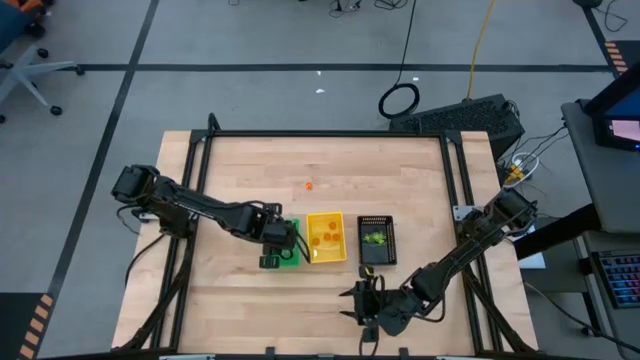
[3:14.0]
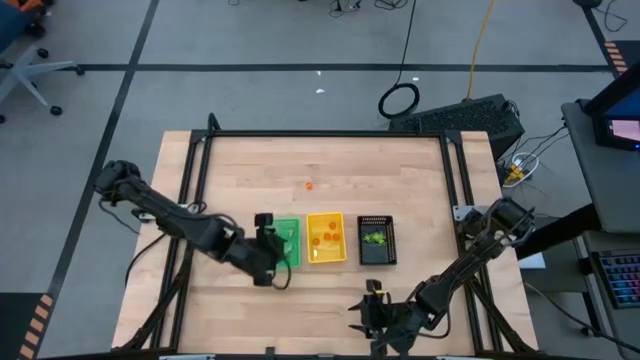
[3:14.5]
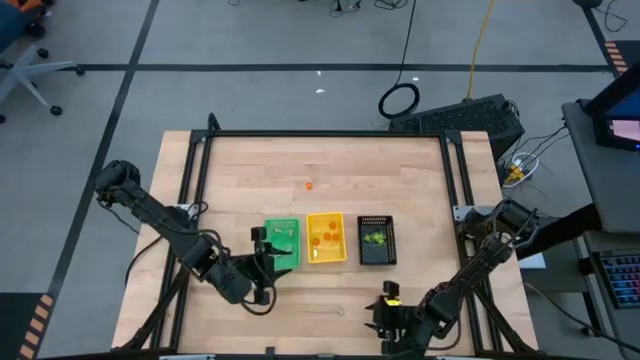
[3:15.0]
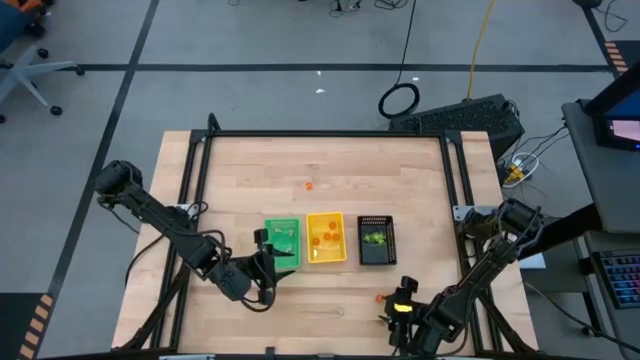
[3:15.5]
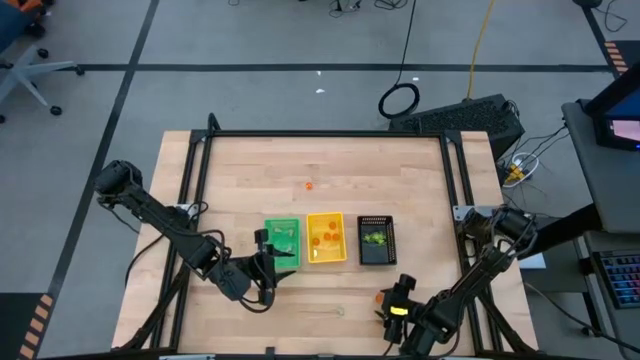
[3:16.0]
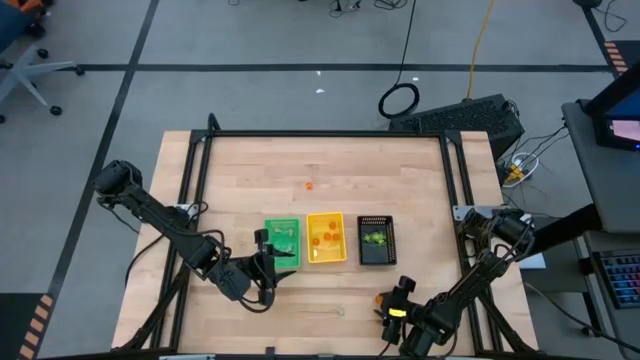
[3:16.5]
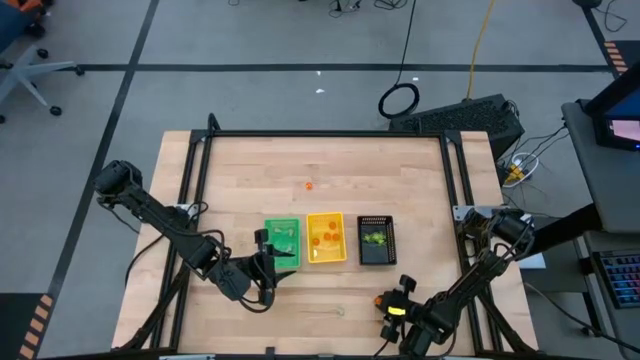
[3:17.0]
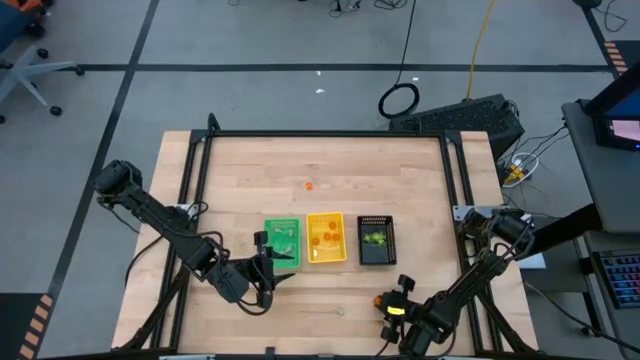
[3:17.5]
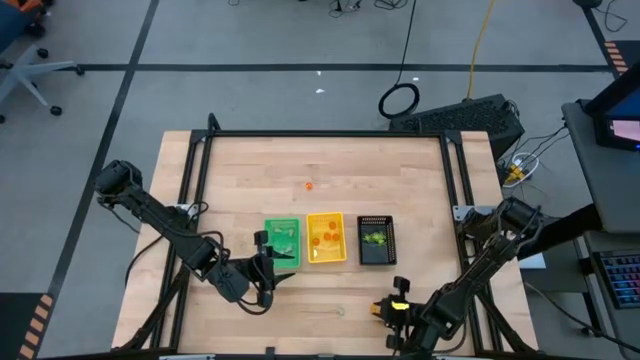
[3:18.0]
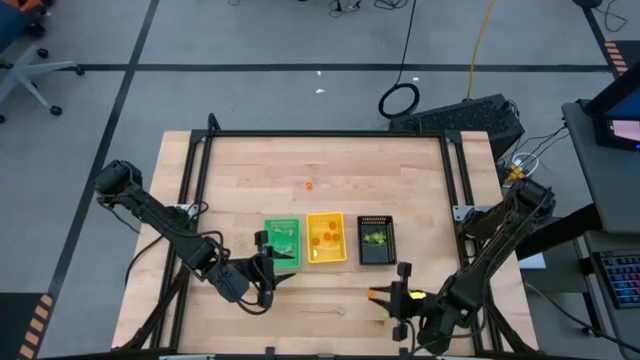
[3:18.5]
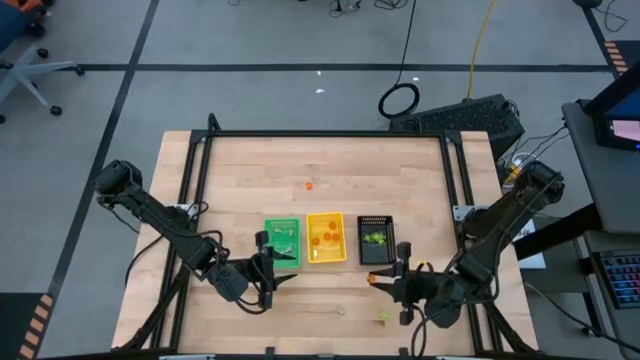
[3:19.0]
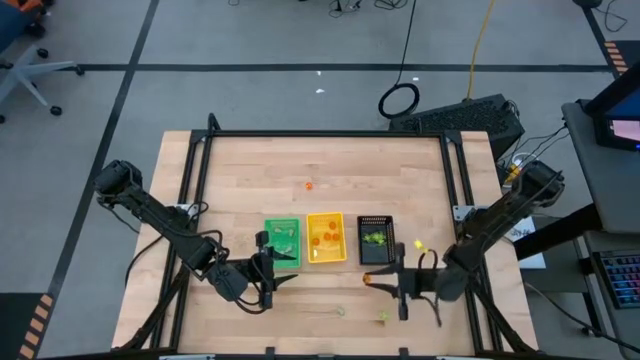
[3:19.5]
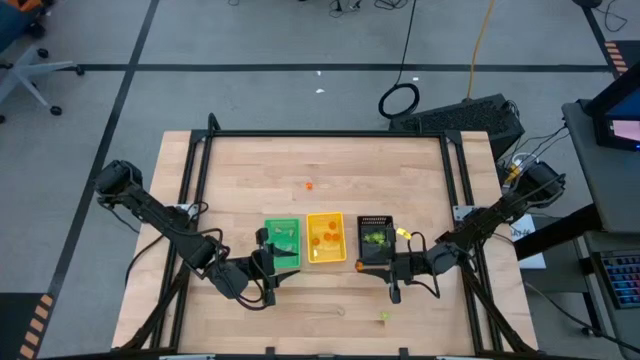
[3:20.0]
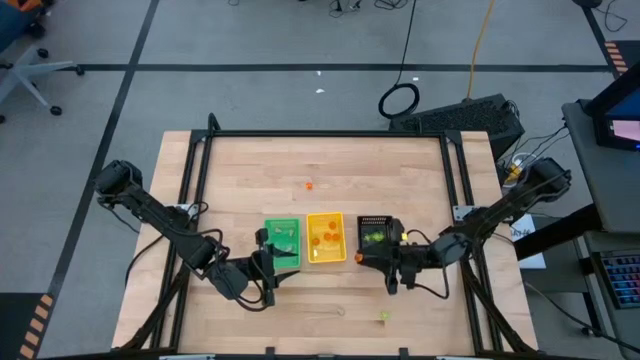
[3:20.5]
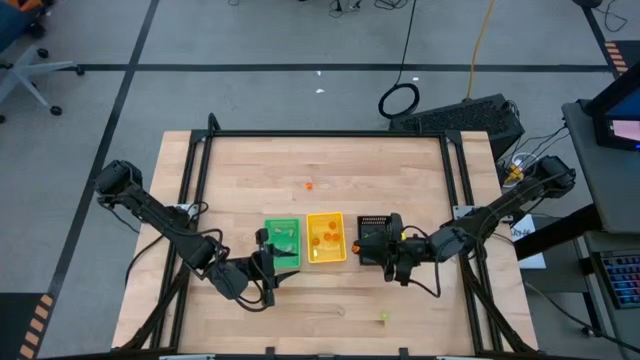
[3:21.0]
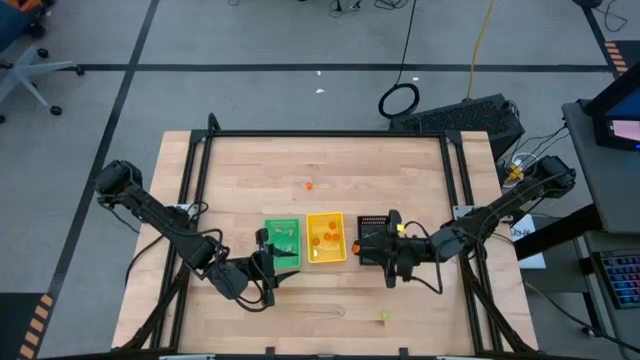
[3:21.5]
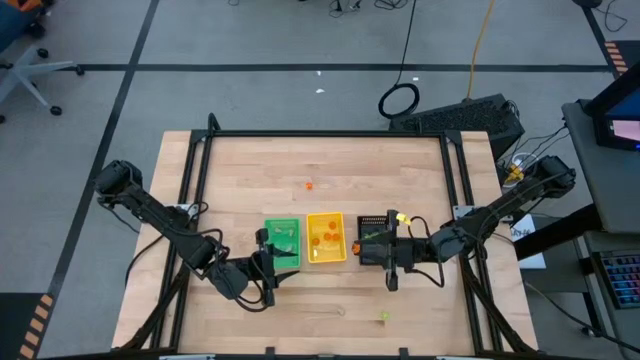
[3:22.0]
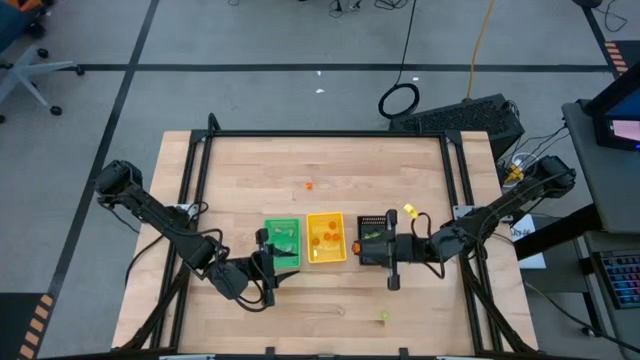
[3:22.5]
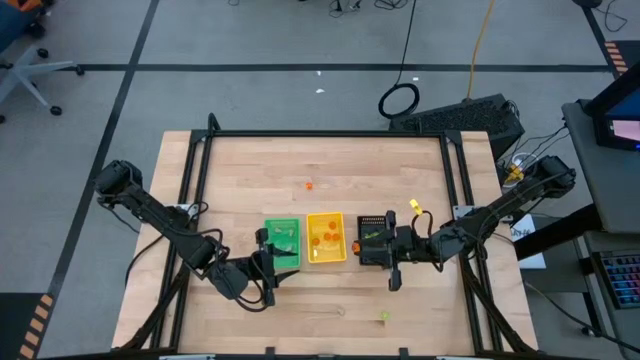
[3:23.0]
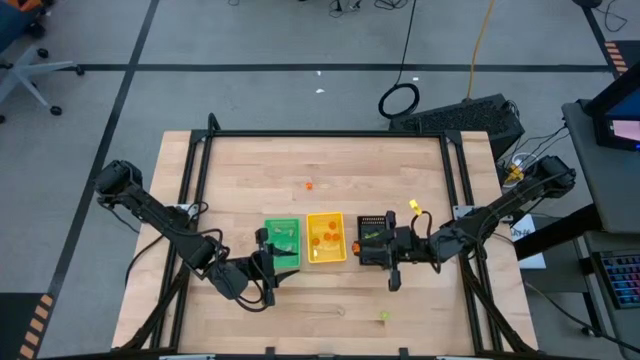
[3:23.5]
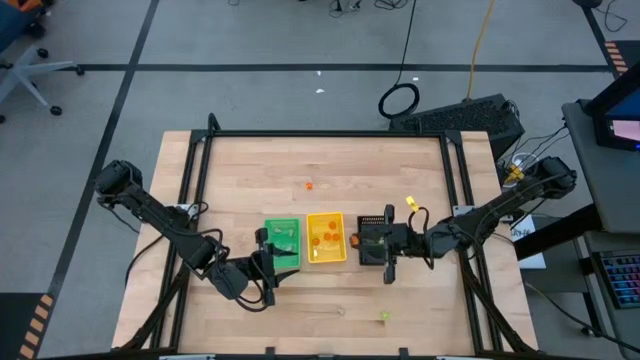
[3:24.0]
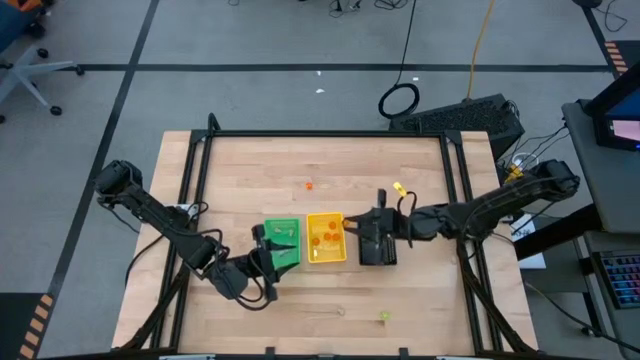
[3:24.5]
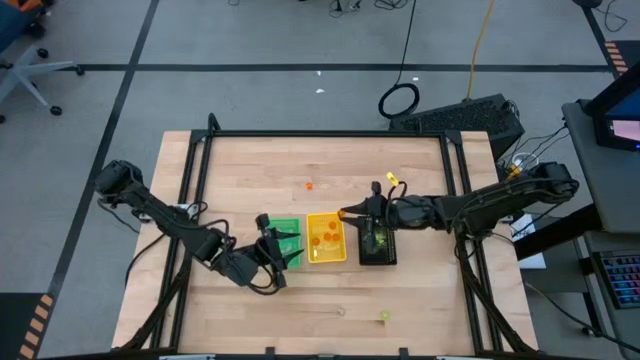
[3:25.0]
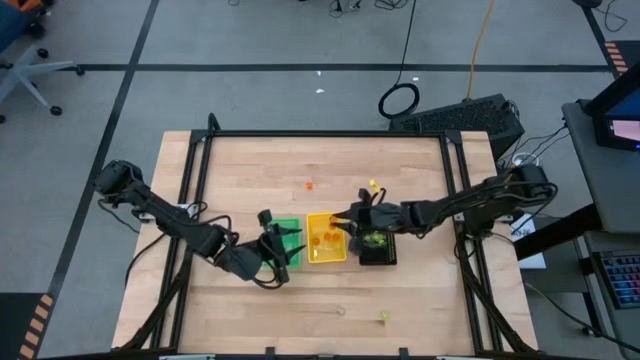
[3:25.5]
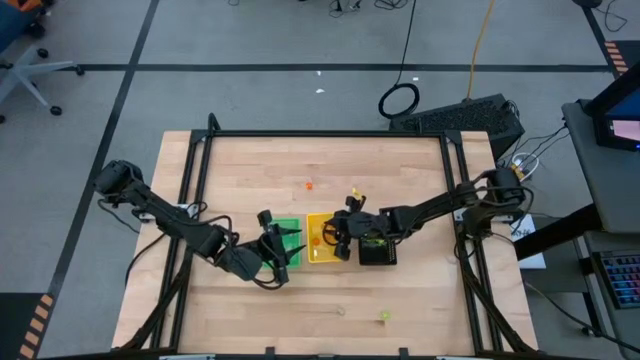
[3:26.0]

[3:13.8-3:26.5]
Task: Sort Halloween decoration
Put the orange pumpkin toy into the yellow basket

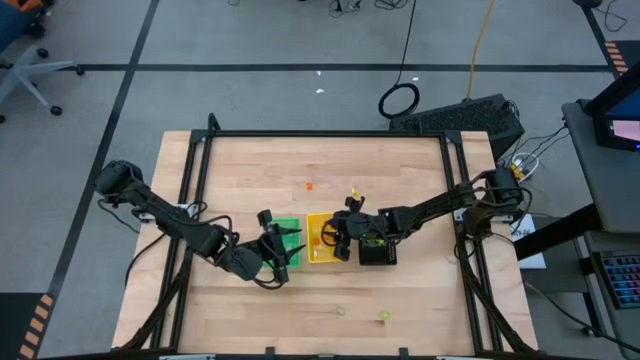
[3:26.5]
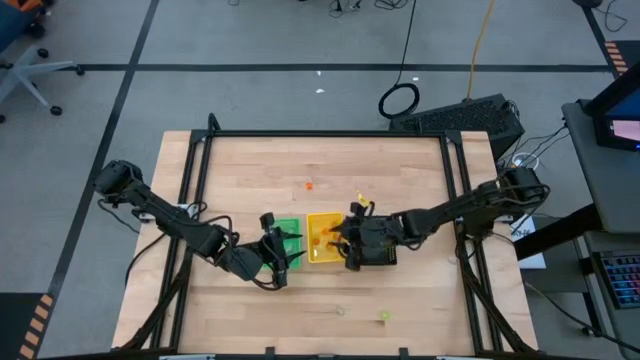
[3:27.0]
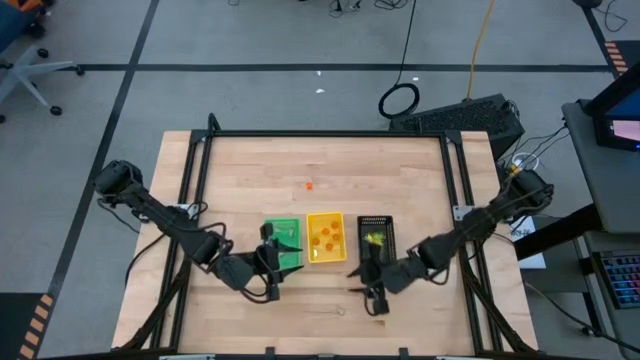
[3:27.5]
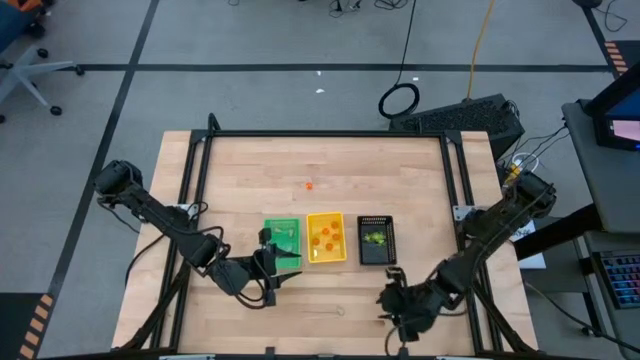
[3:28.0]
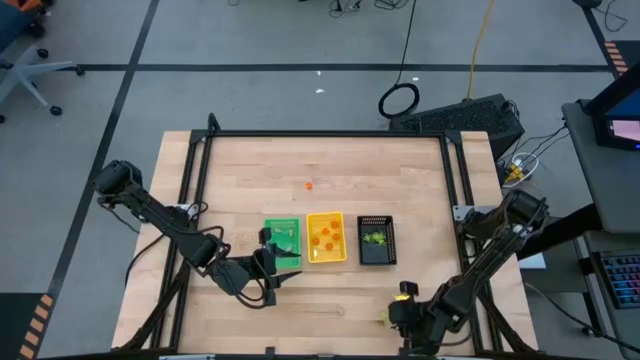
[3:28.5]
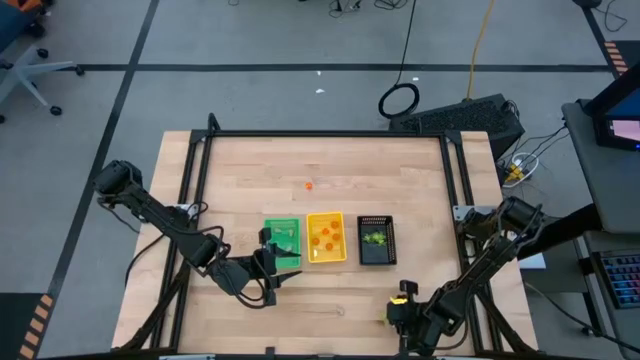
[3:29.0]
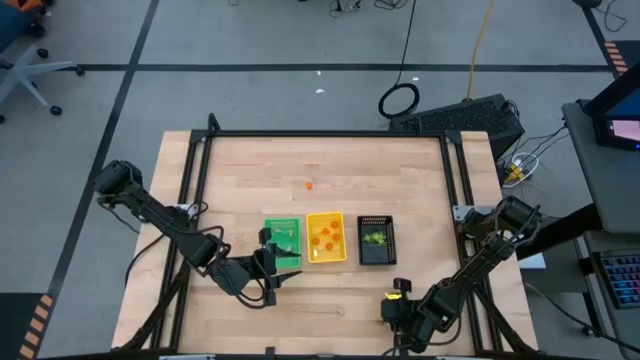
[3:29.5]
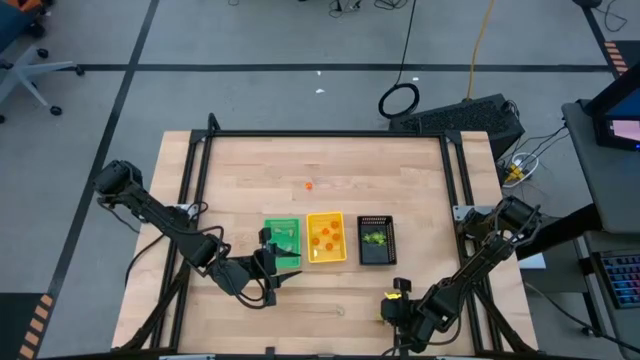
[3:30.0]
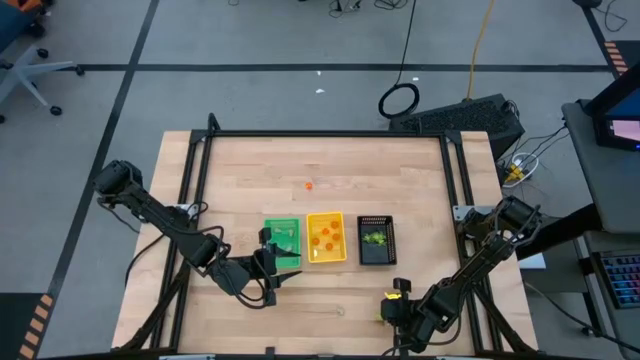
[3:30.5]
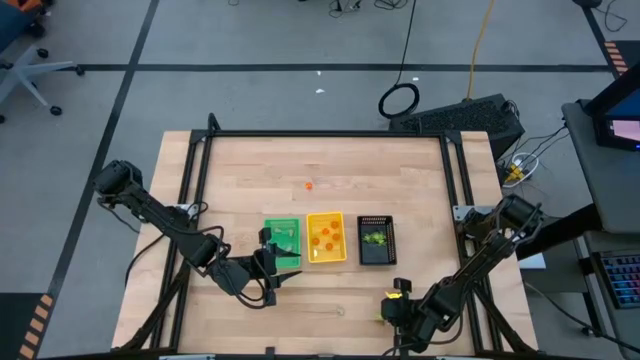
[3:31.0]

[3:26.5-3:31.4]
Put the green spider toy into the black basket
